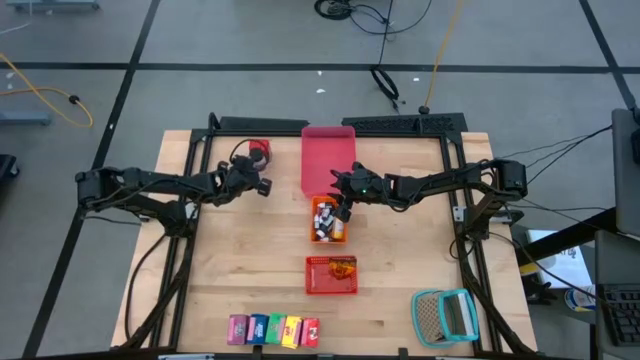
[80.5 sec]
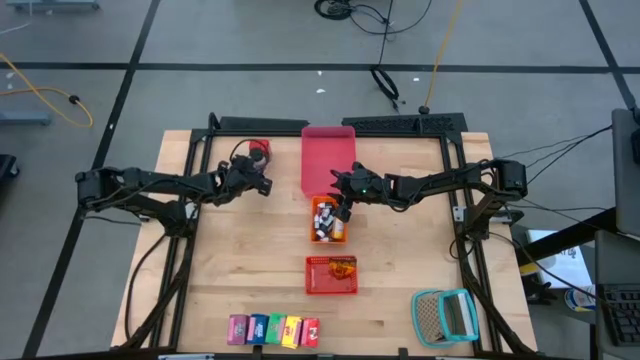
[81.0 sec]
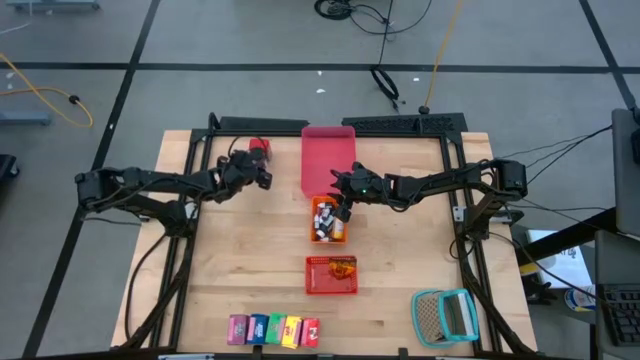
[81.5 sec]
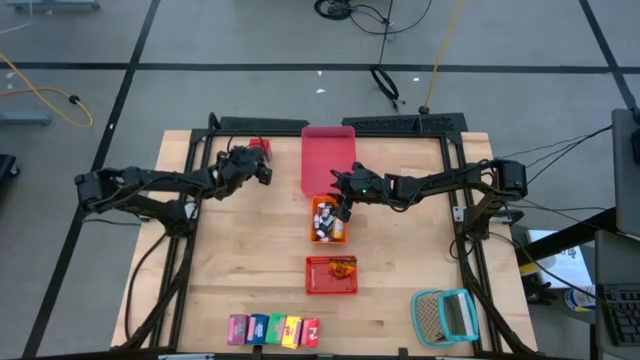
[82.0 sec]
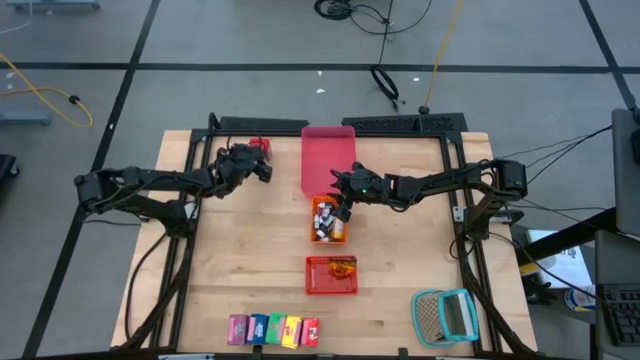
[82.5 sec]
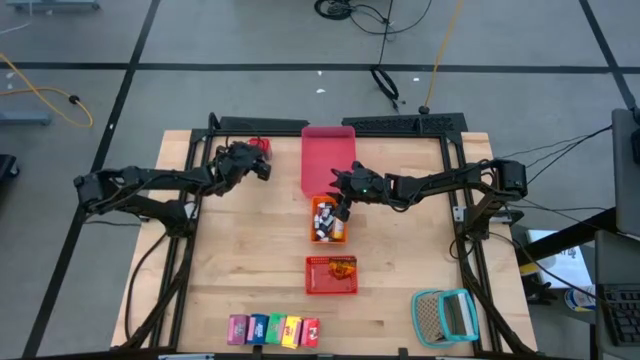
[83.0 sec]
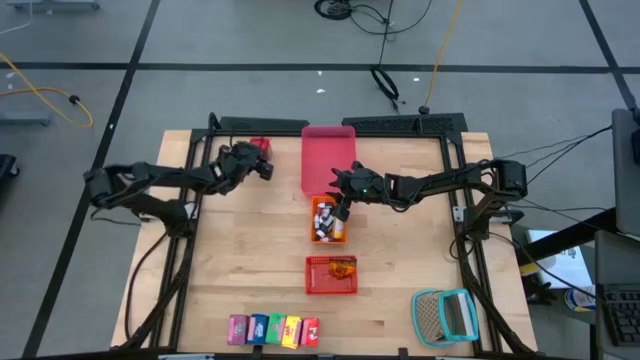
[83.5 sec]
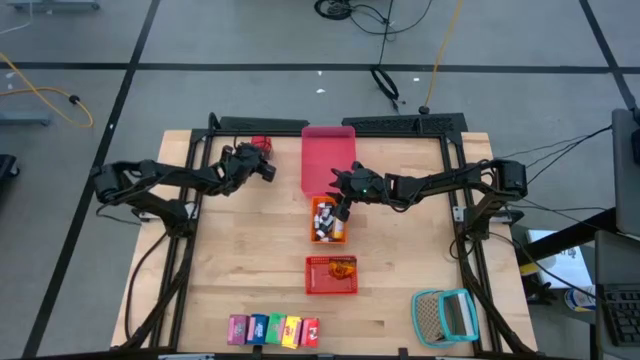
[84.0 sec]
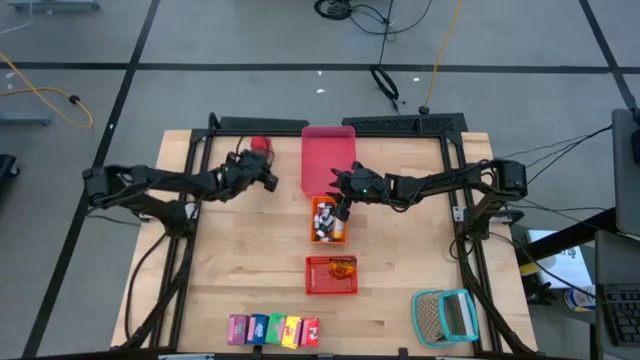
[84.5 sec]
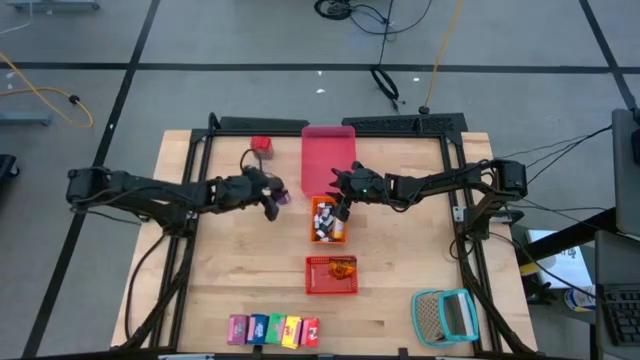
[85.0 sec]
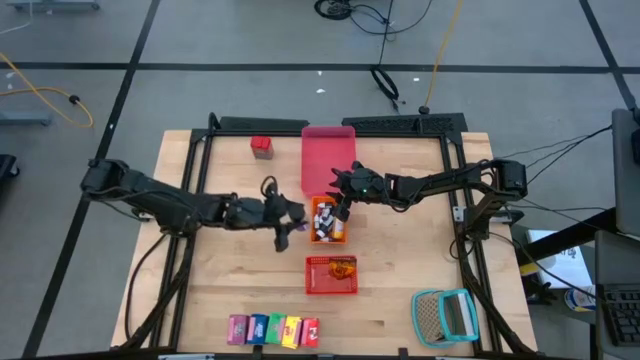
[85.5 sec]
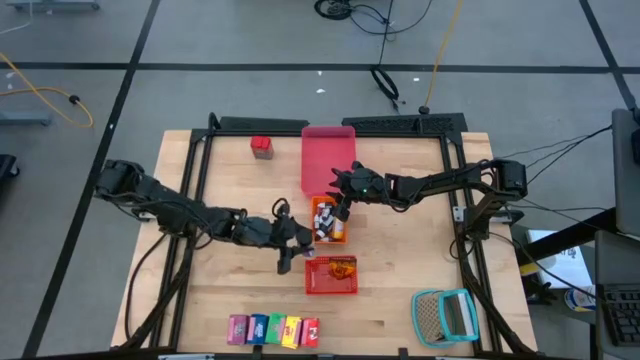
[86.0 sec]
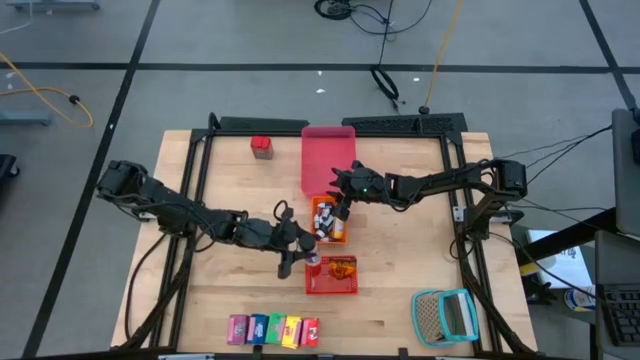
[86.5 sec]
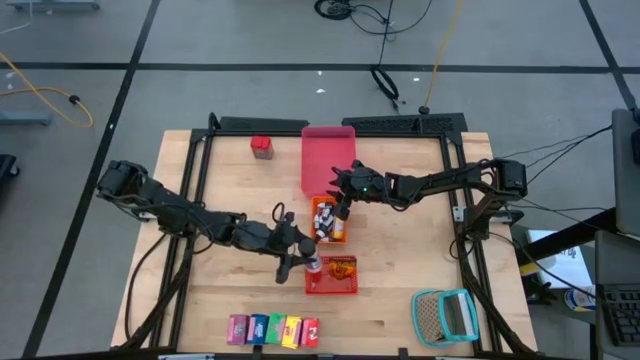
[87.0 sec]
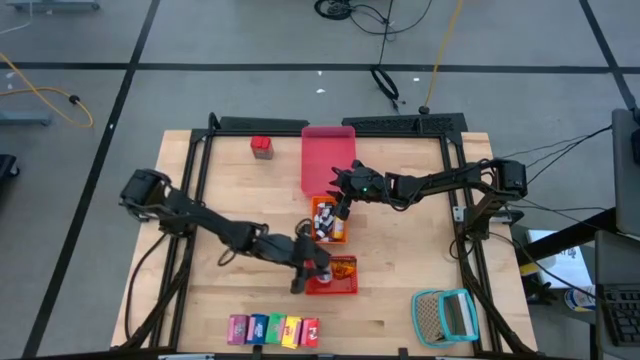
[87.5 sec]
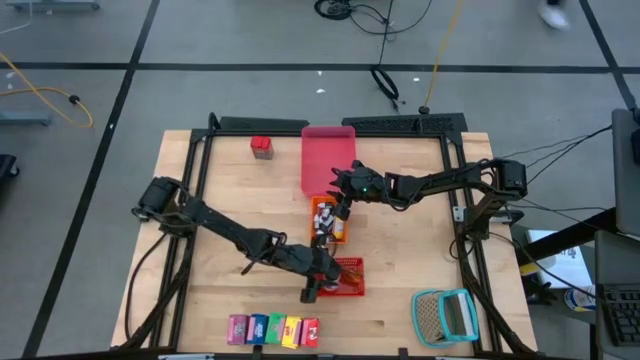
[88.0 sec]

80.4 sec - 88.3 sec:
Task: Pick & Place Kitchen Items
Put the black seasoning bottle into the red basket

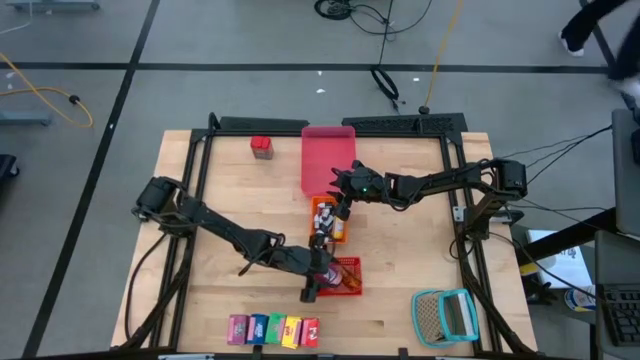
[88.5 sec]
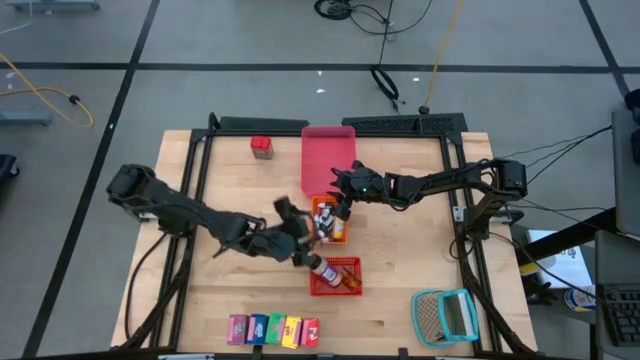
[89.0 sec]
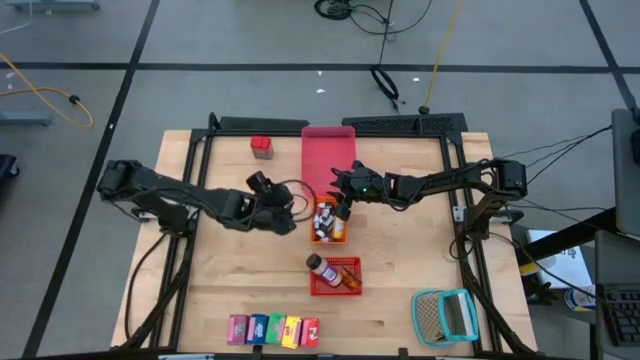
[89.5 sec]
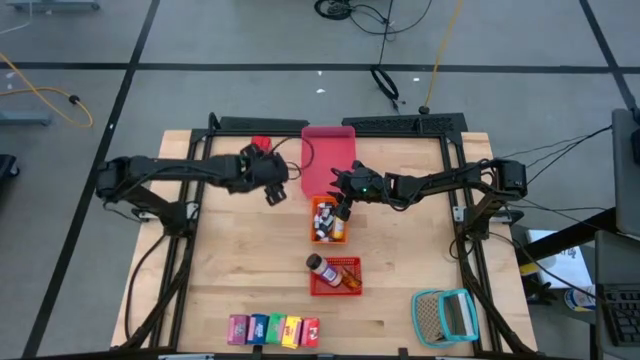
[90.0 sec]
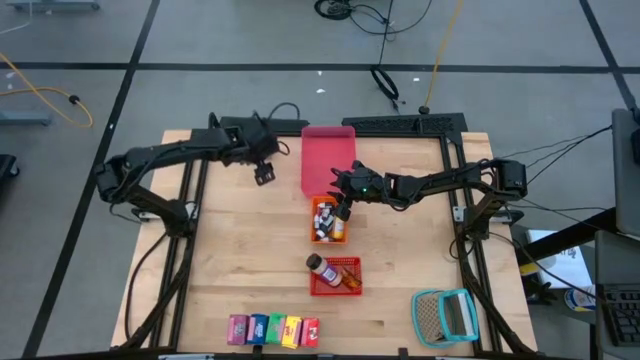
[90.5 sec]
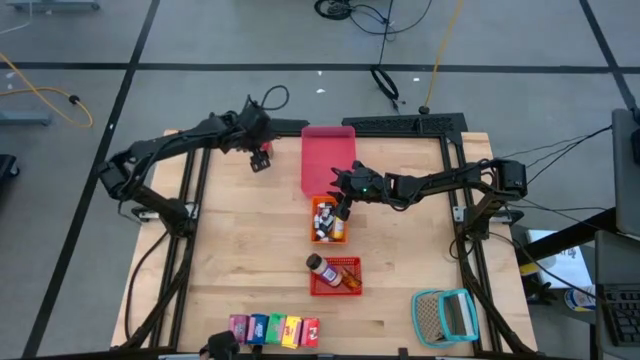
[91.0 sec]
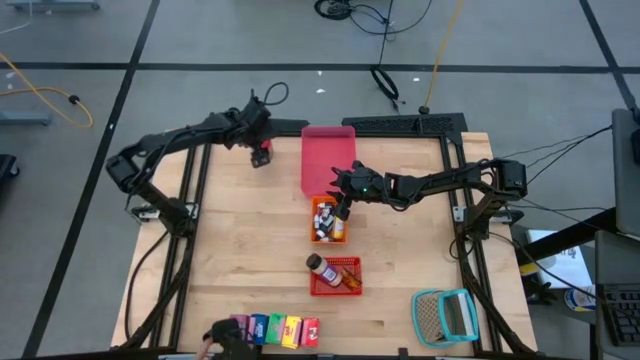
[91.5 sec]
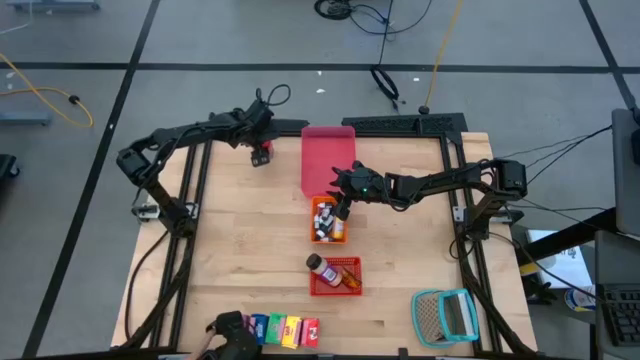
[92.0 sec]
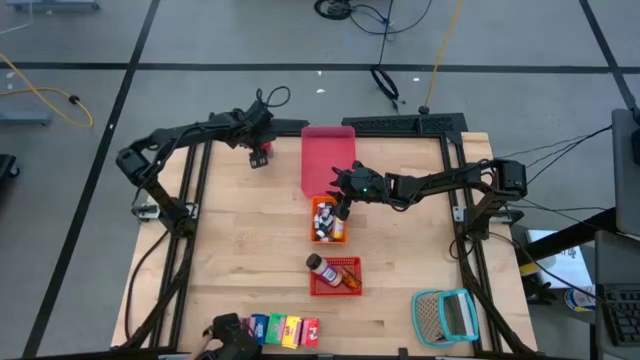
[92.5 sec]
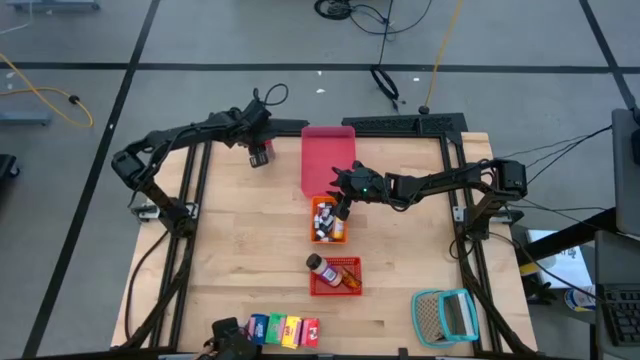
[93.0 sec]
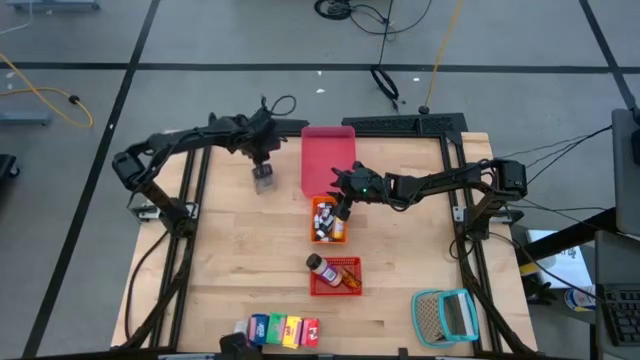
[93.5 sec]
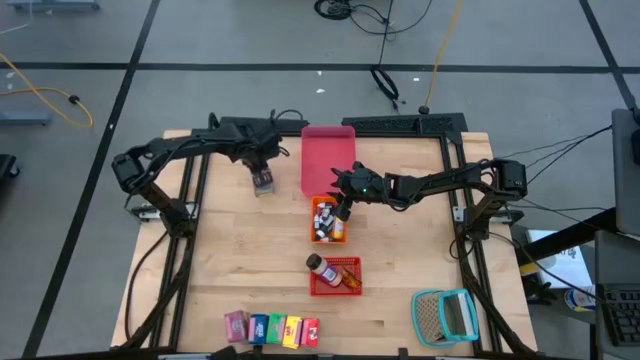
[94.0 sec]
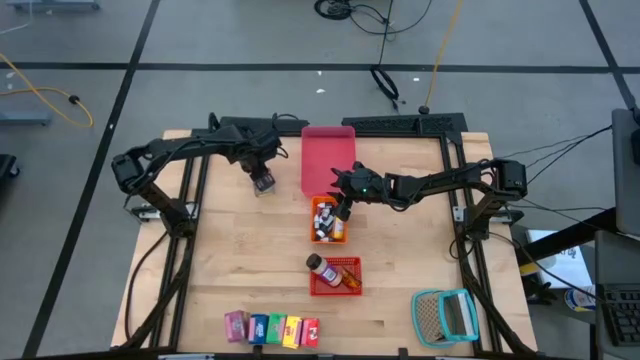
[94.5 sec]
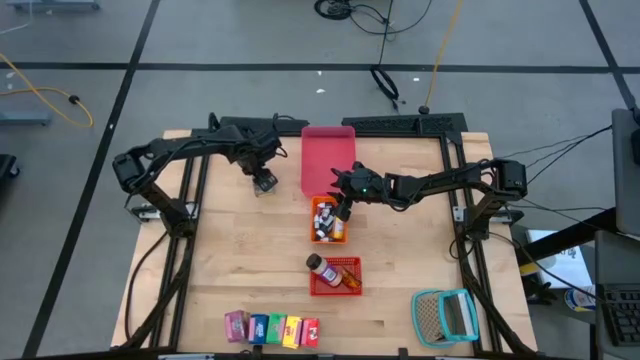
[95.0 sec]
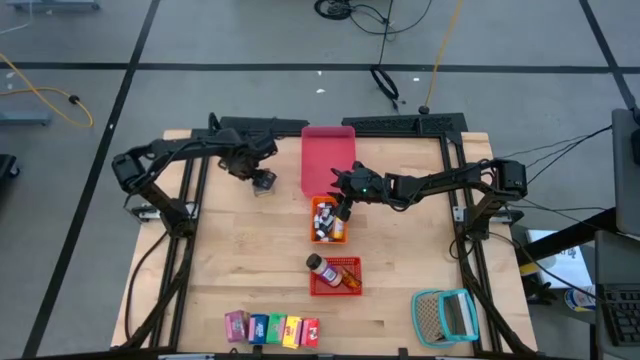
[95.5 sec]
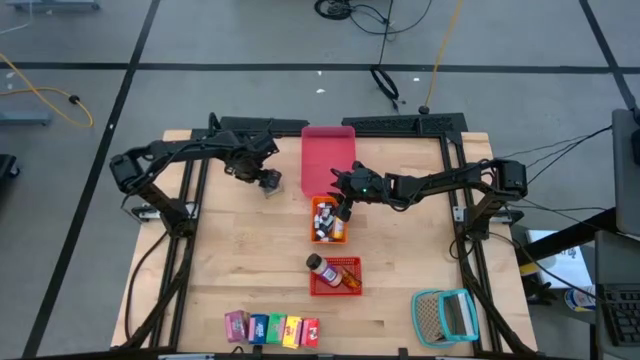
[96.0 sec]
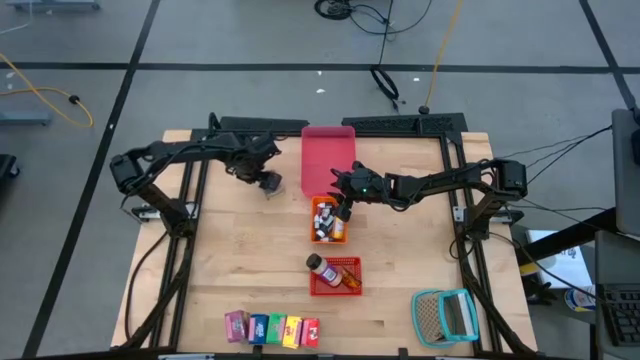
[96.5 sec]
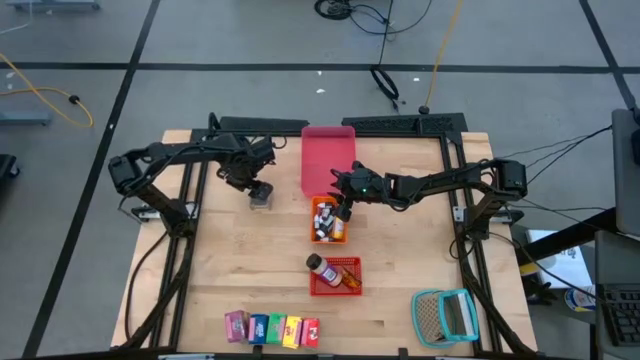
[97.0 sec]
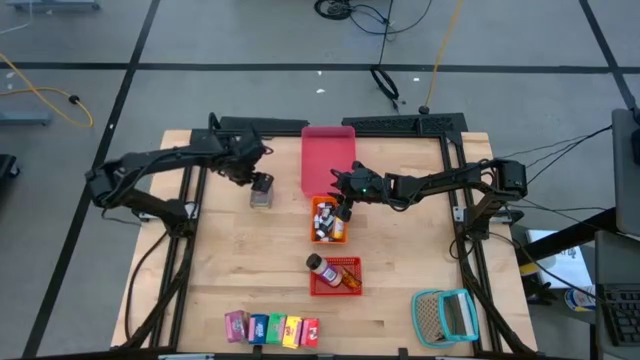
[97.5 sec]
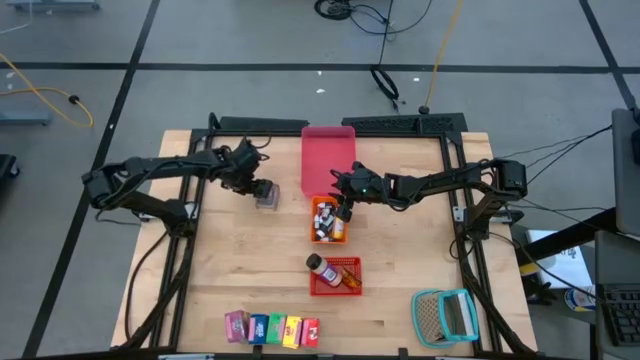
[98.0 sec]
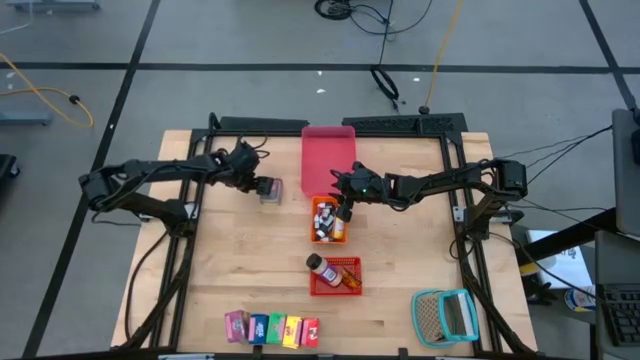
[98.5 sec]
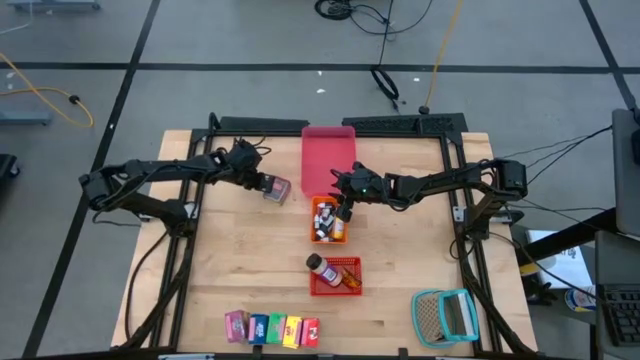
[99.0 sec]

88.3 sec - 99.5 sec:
Put the red seasoning can into the red basket

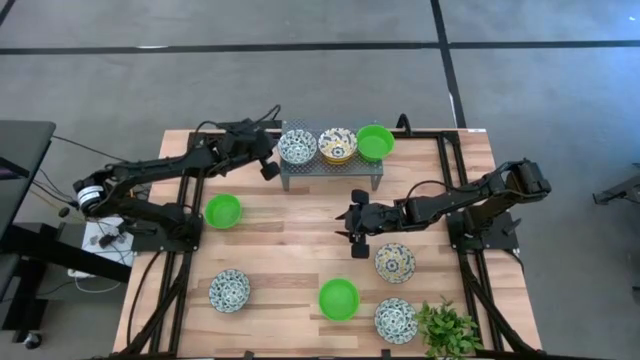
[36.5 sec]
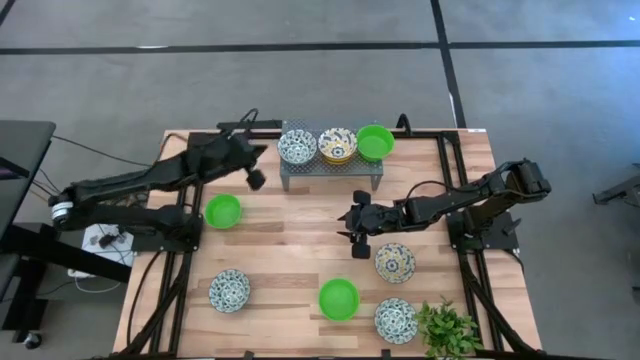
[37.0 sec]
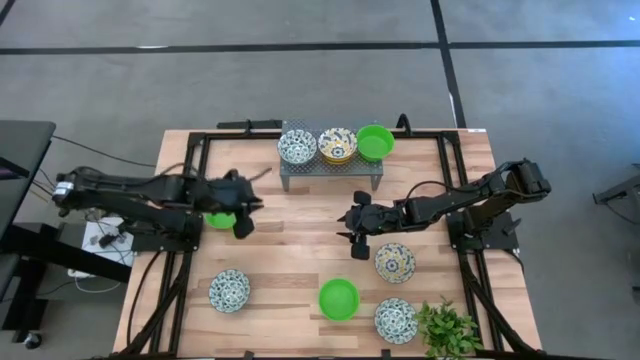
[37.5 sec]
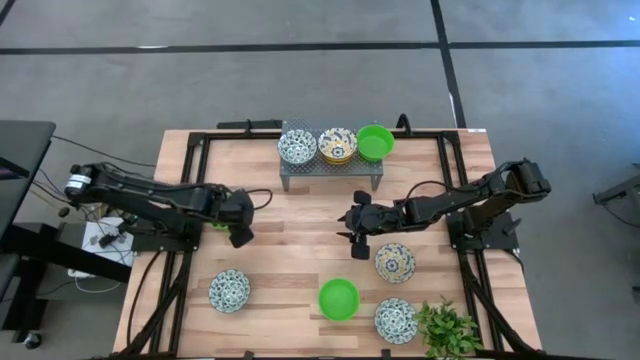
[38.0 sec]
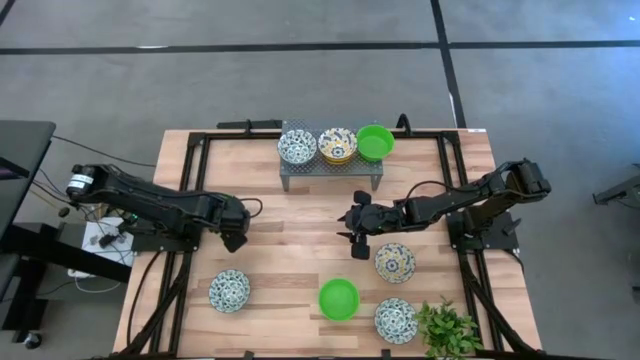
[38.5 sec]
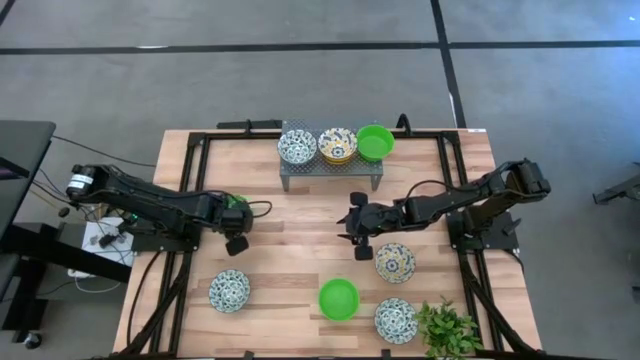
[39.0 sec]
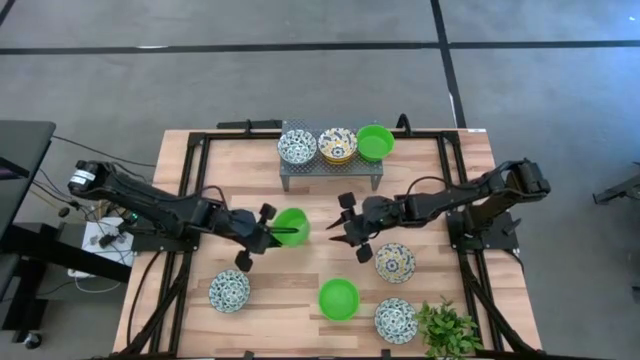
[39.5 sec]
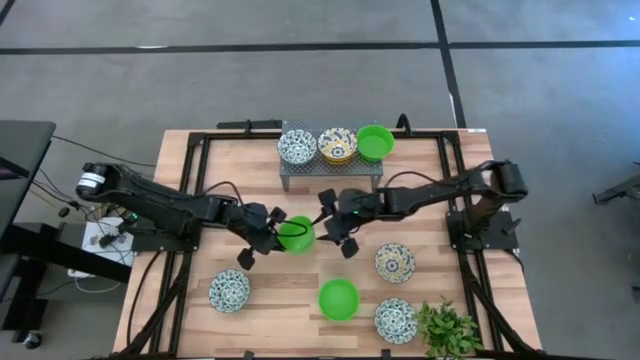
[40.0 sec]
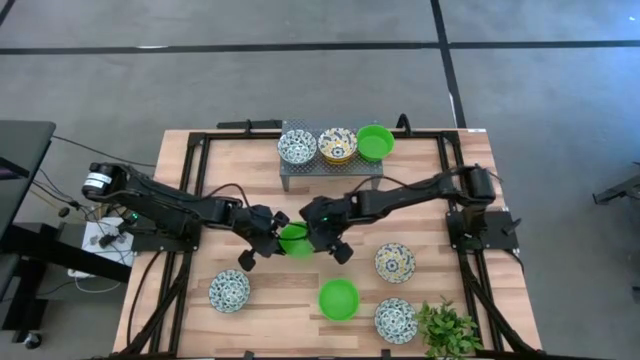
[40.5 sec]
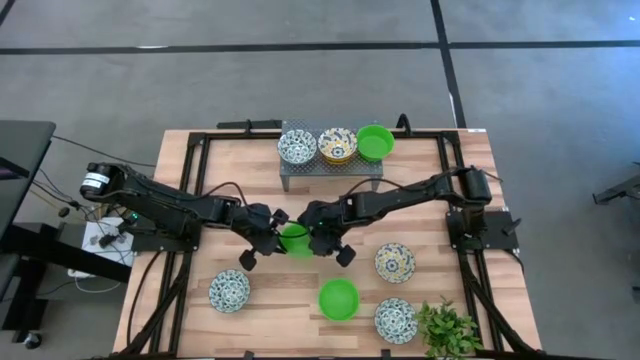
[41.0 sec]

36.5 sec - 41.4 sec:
Task: Pick & Place Mini bowls
Stack the top green bowl on the green bowl on the shelf
